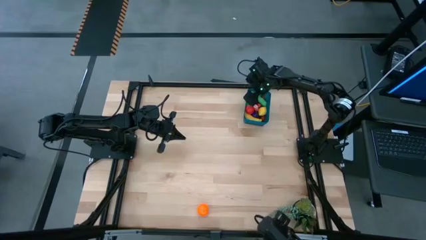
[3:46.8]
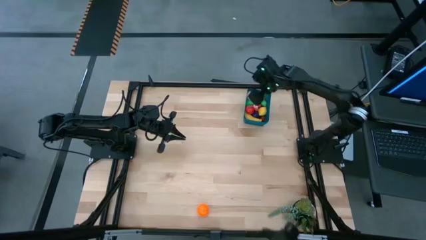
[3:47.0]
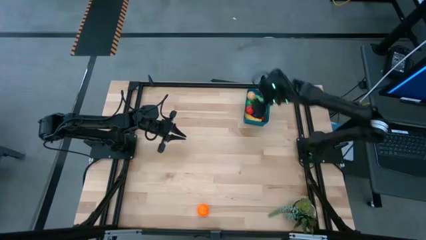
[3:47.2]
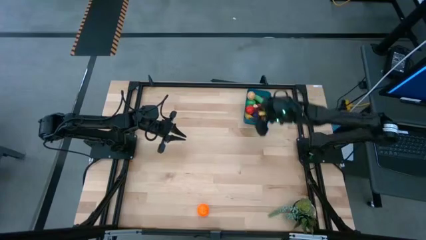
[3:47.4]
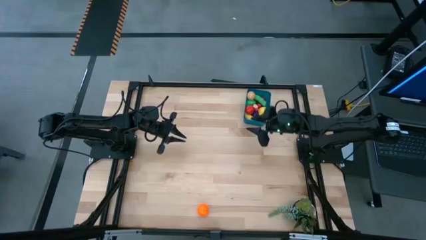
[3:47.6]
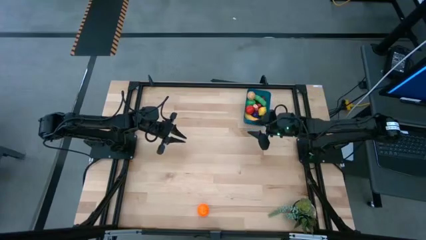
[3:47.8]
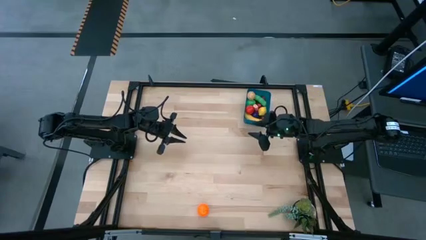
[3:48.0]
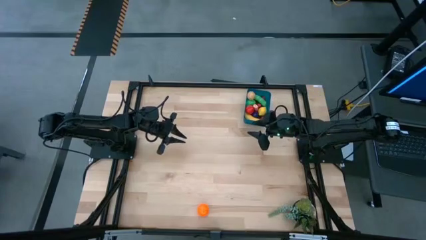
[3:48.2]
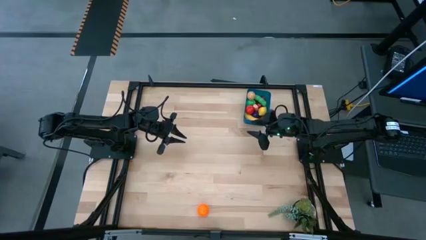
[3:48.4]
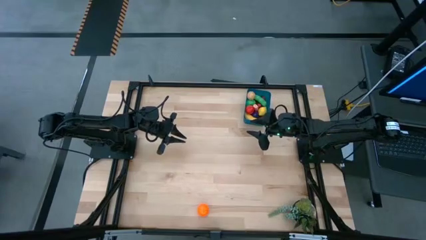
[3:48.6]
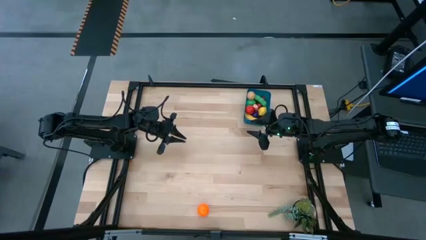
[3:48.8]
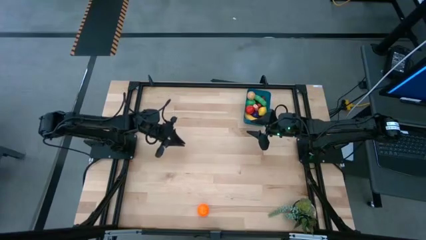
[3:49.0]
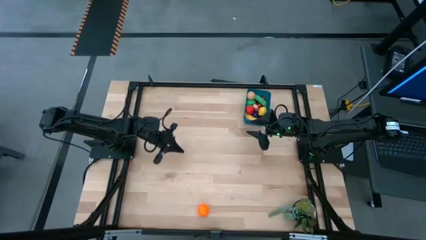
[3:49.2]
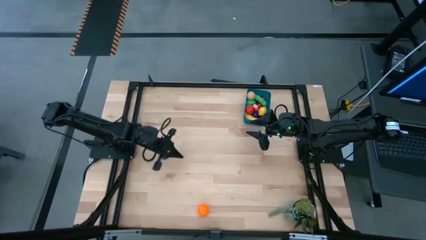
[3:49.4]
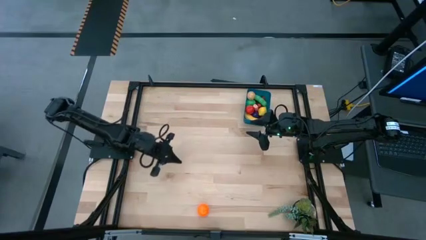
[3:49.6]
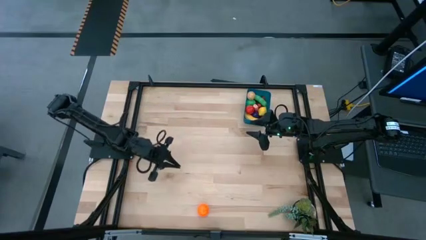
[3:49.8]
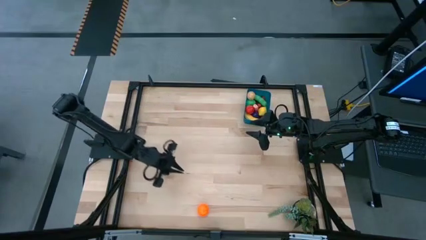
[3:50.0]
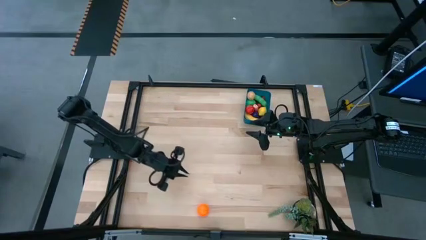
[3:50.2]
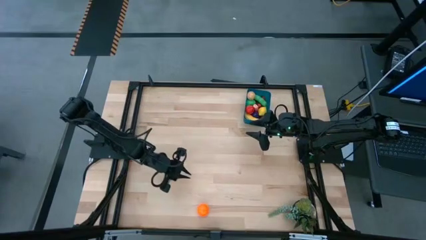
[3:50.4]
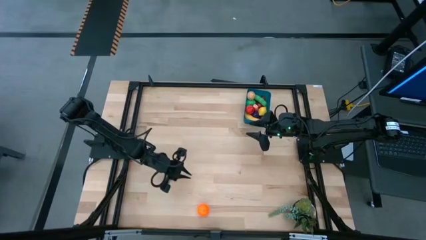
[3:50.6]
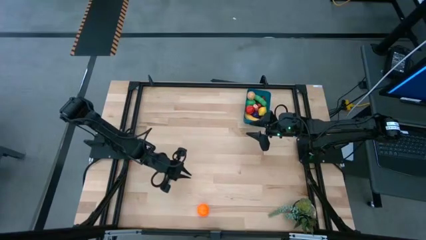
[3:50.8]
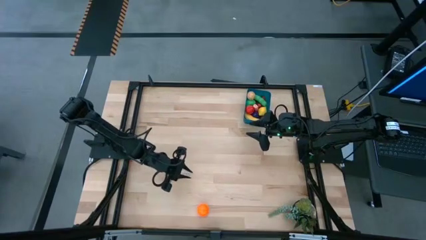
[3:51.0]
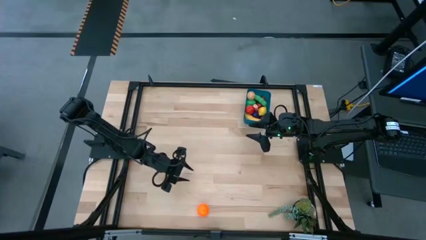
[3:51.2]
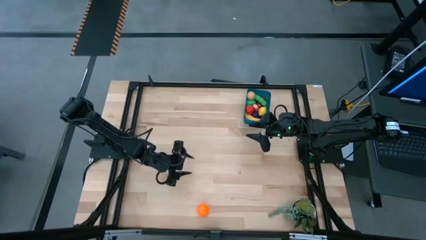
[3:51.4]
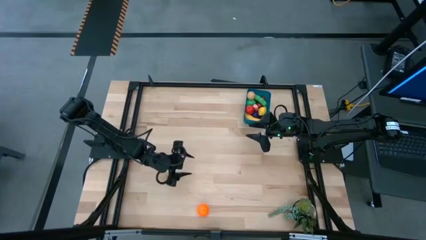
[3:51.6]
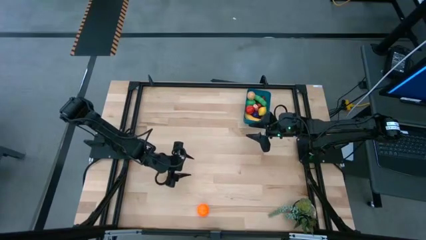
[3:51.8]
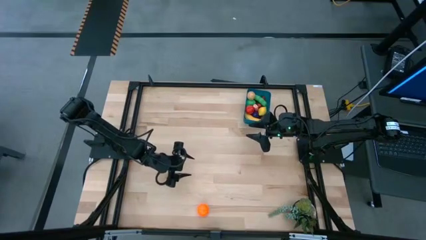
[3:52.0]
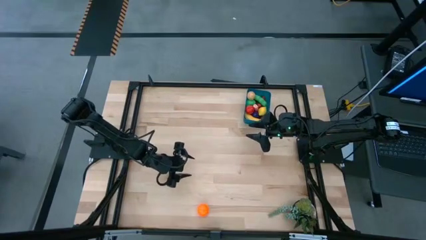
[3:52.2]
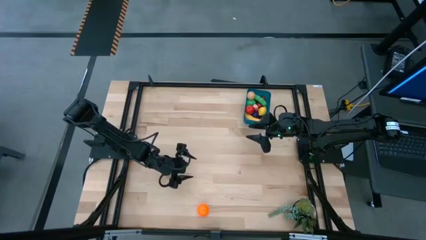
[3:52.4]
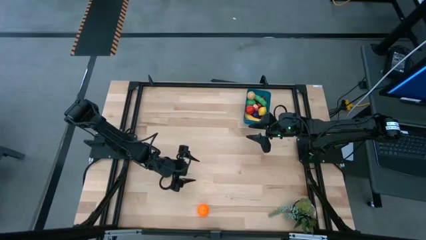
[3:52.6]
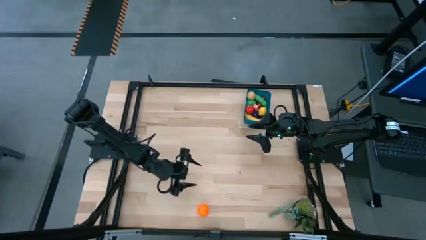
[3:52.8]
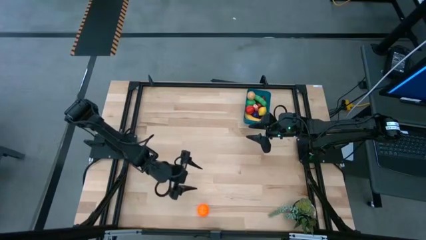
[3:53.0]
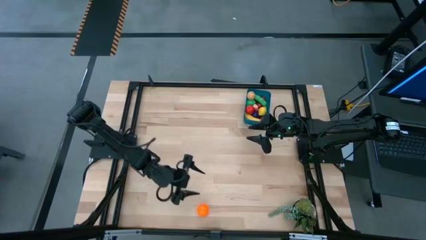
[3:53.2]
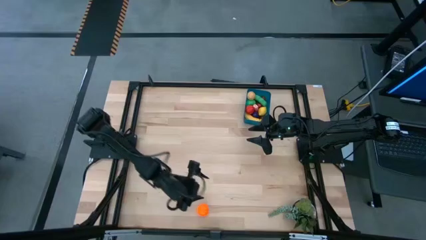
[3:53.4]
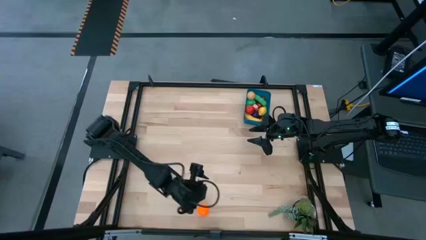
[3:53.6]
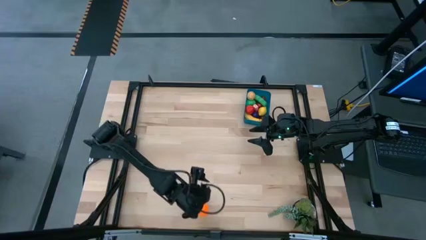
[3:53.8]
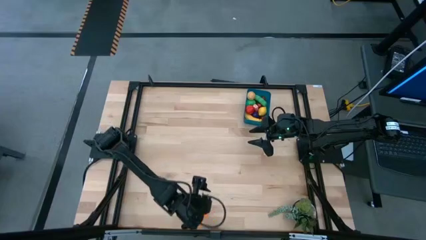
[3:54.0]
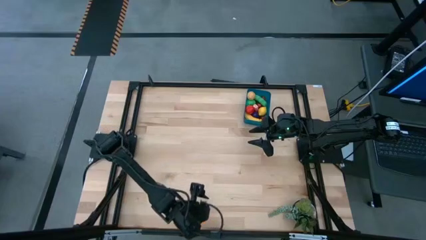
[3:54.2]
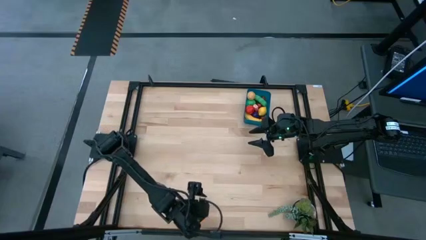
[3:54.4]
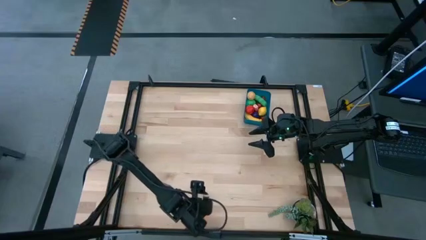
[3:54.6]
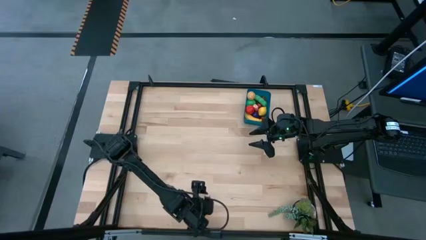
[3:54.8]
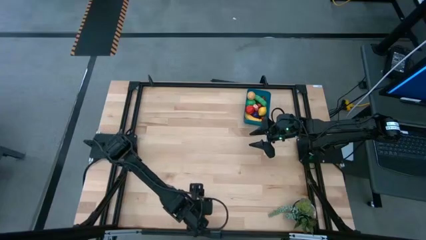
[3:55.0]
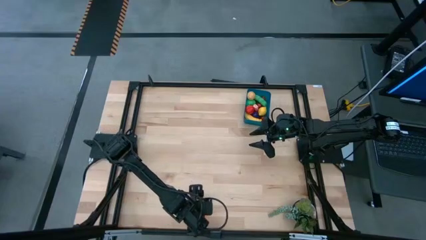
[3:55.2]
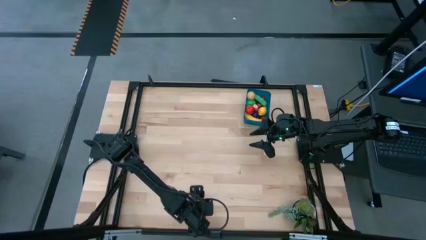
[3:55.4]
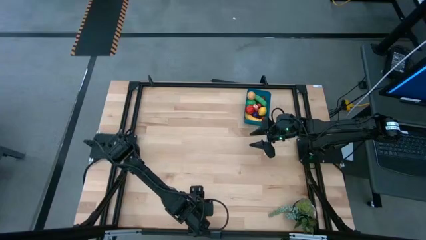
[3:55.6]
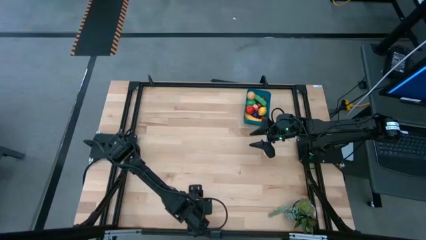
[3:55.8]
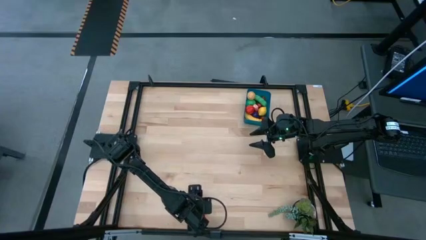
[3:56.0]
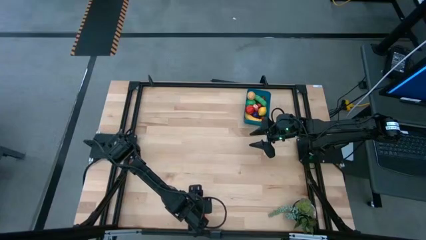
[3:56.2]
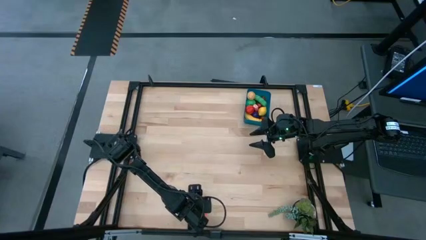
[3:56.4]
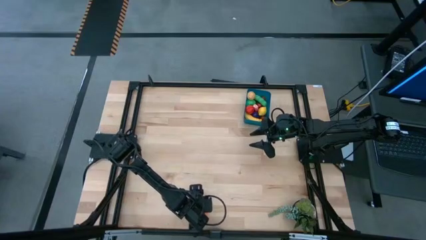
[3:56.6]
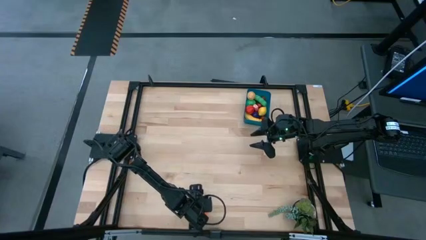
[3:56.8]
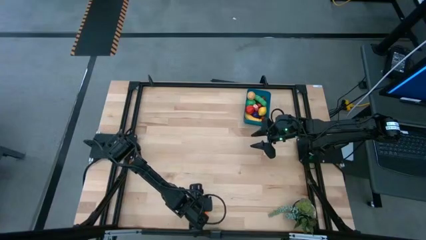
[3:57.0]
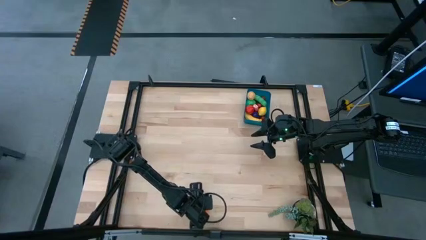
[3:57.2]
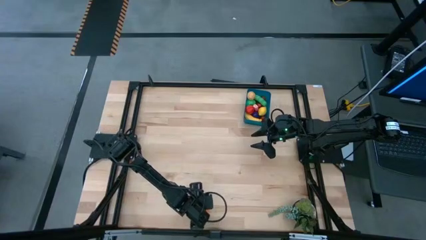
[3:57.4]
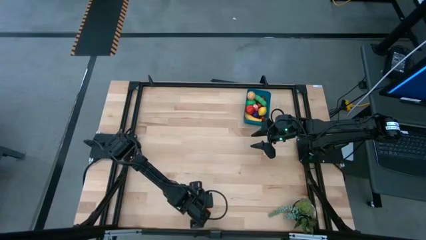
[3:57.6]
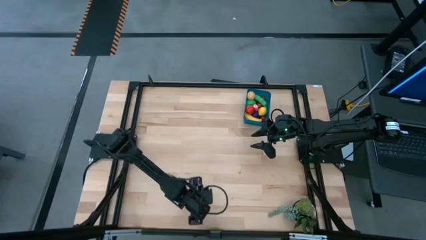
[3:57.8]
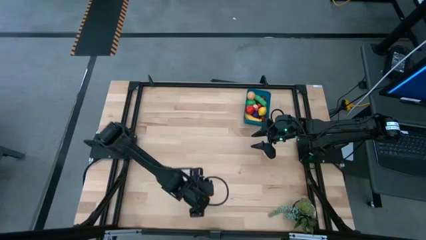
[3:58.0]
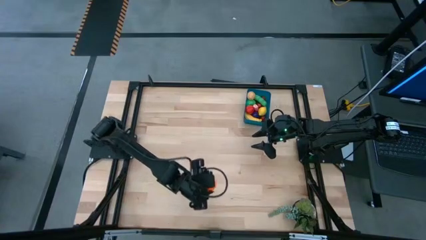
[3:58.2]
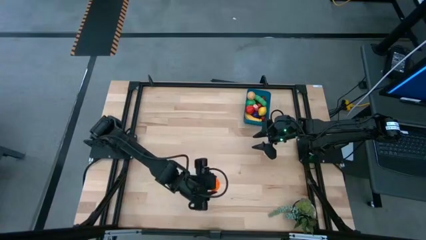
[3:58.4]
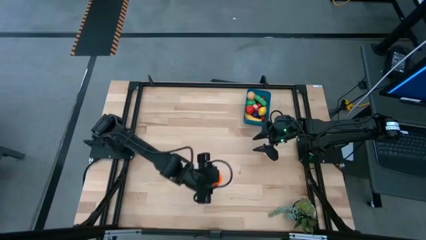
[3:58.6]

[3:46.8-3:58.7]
Task: Pick and placing Produce into tupperware
Put the orange pumpkin into the blue bin

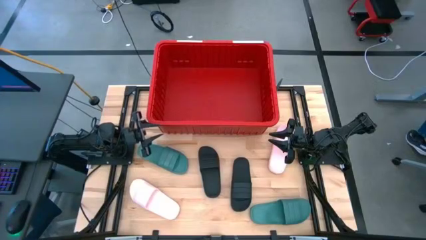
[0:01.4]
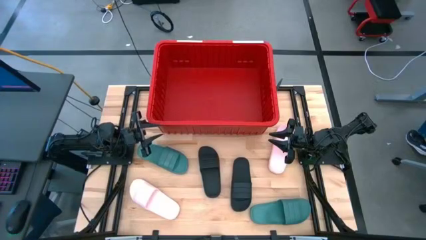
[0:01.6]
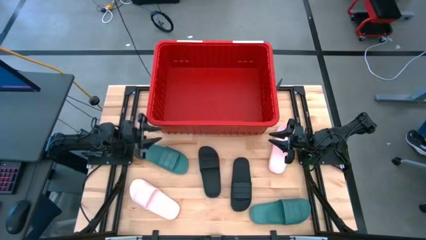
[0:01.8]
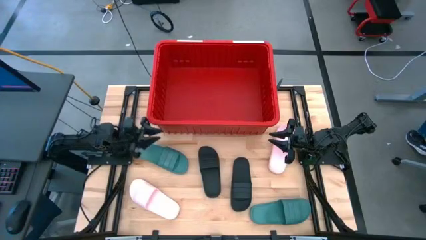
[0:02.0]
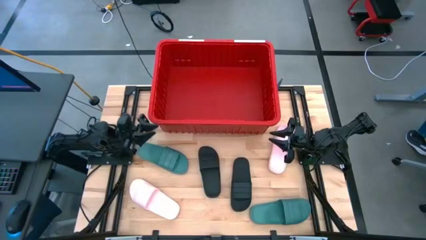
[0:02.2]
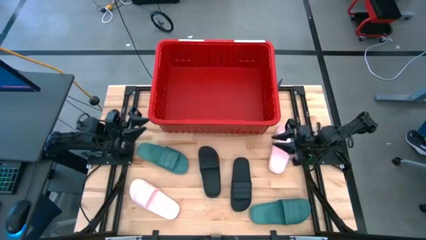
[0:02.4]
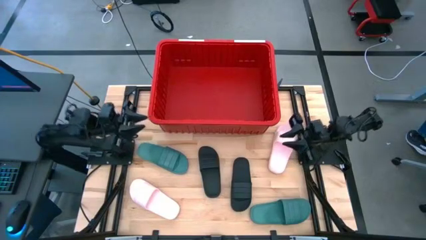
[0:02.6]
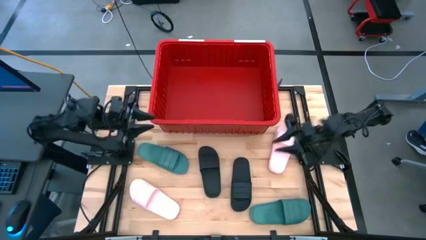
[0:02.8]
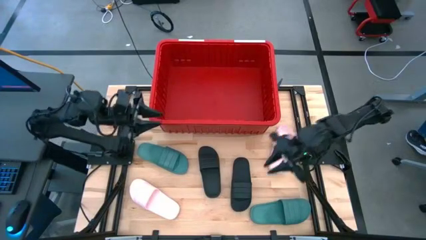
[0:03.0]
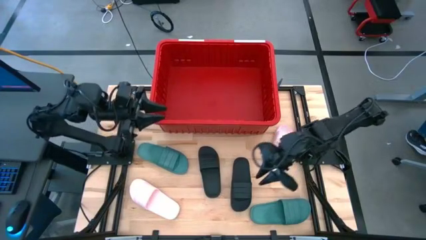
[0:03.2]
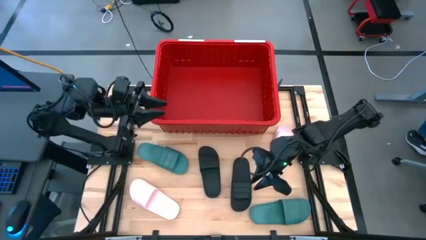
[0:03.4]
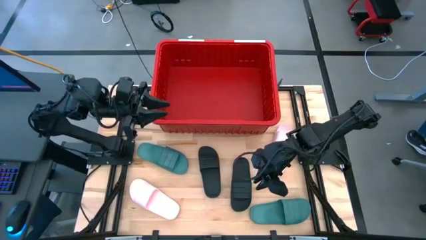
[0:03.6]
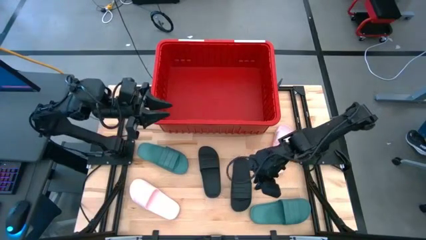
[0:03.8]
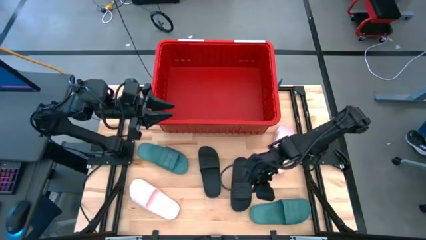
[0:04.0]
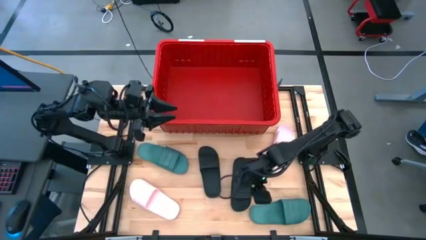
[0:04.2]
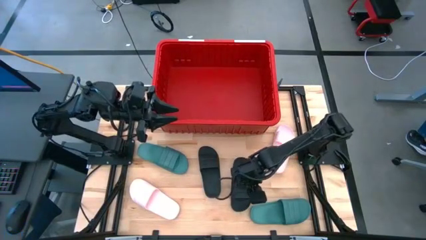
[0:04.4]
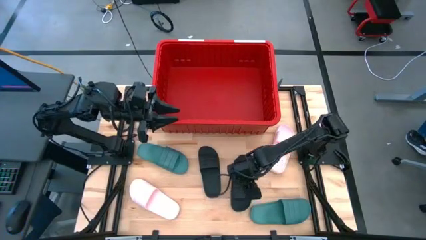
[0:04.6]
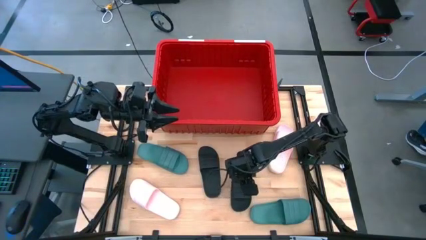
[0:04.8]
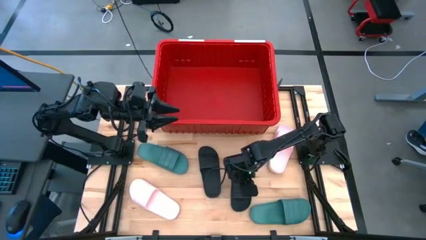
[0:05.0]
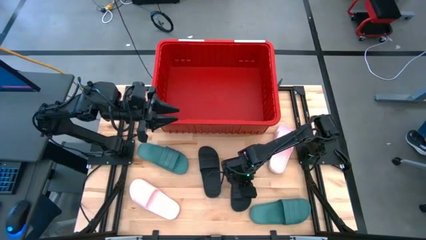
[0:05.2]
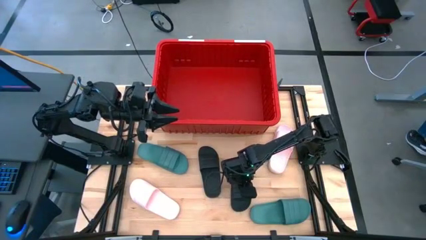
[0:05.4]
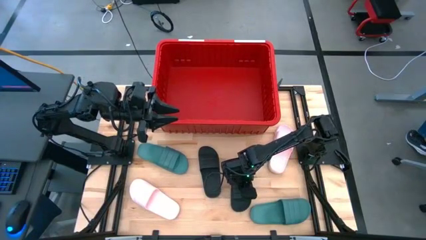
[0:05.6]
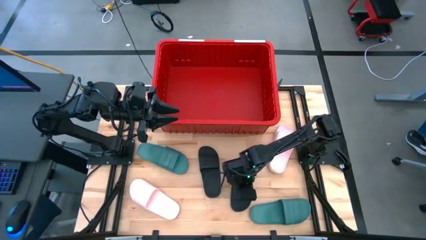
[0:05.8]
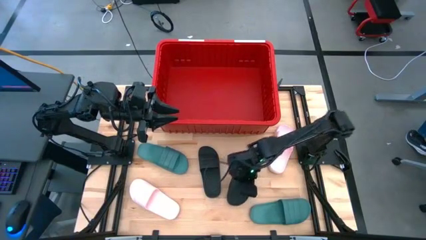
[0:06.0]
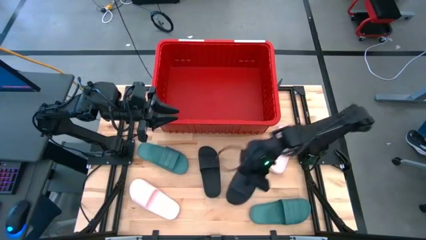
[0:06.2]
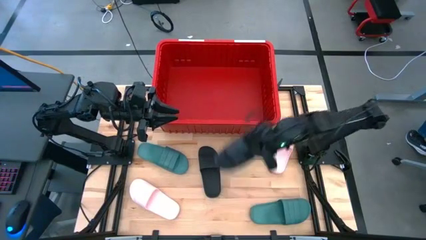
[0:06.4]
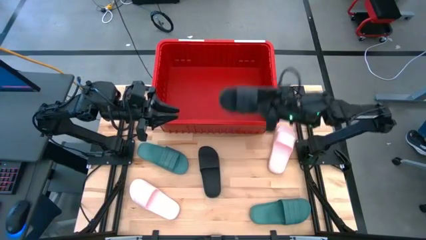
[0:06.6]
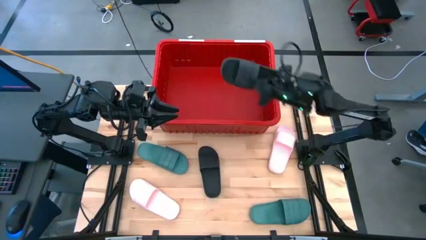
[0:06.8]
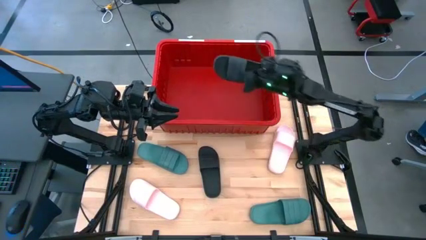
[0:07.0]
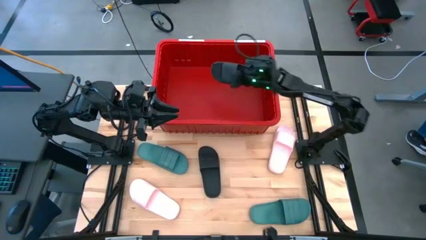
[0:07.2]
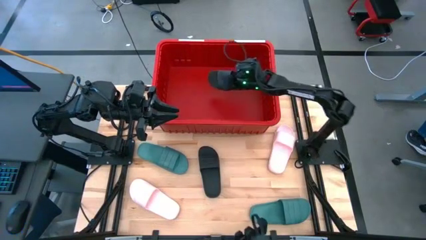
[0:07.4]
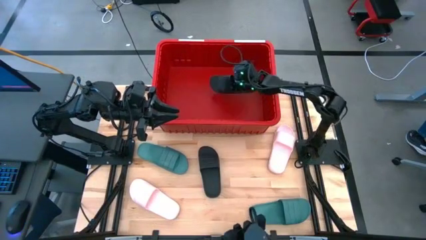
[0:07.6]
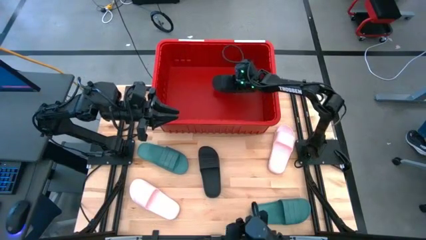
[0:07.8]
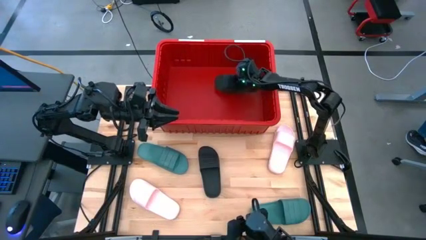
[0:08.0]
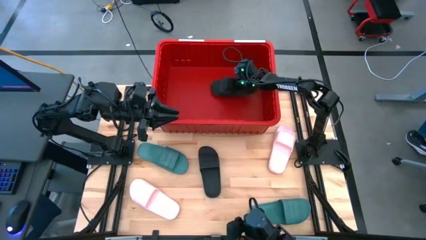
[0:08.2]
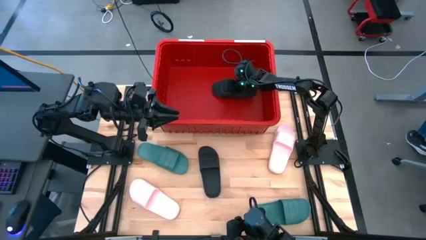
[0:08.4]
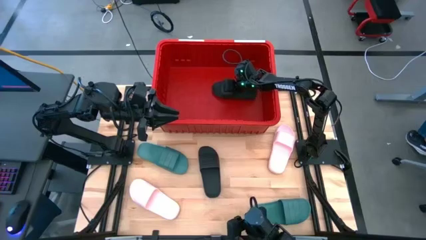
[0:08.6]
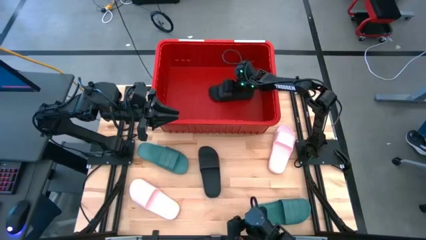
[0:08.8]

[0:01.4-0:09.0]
Task: Pick and place slides into bin
Put the right black slide into the red bin
